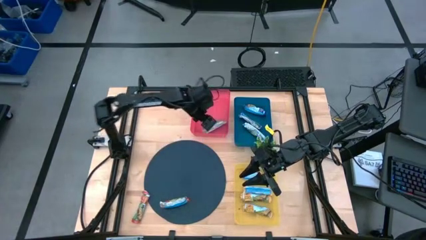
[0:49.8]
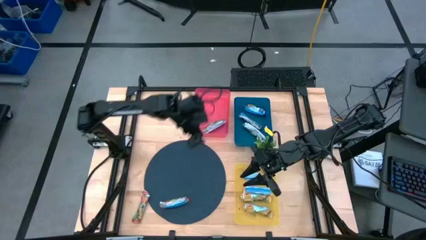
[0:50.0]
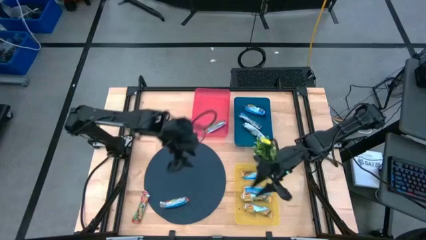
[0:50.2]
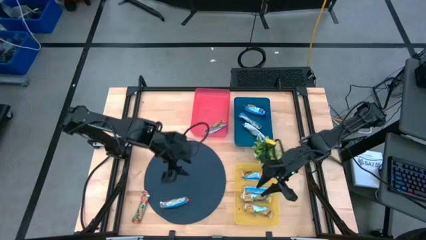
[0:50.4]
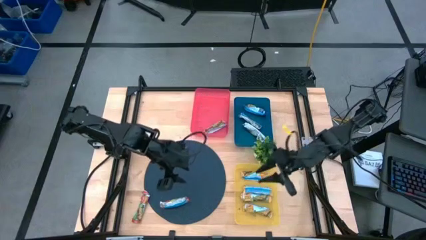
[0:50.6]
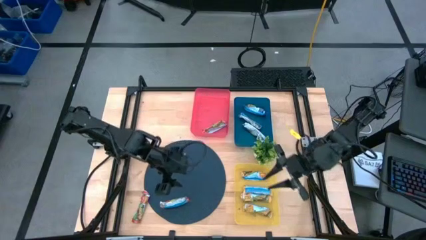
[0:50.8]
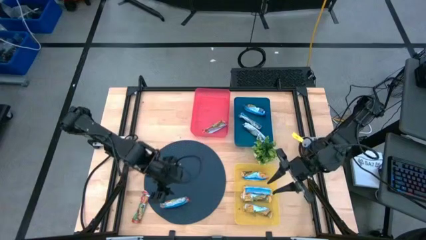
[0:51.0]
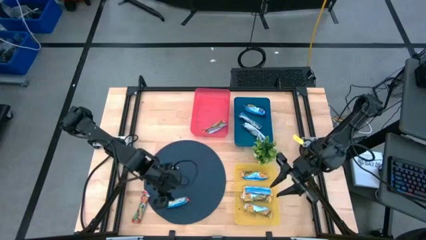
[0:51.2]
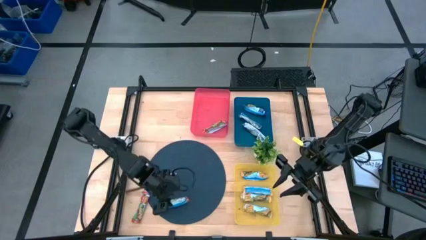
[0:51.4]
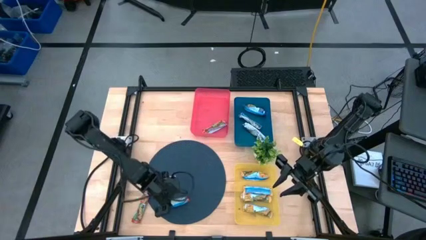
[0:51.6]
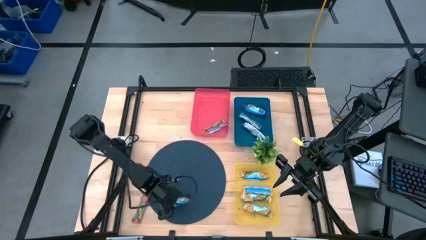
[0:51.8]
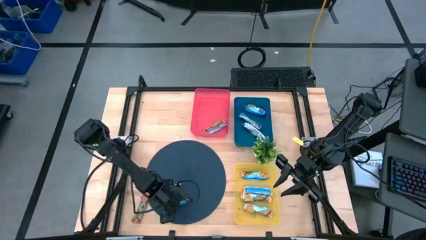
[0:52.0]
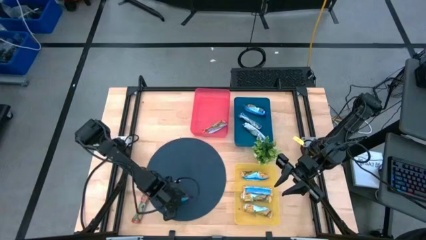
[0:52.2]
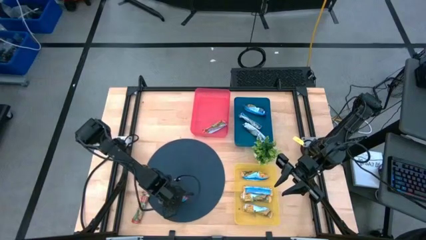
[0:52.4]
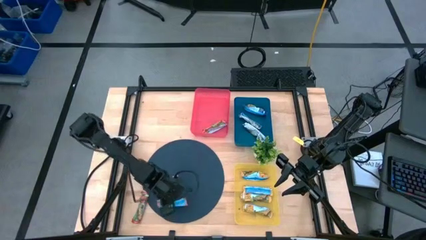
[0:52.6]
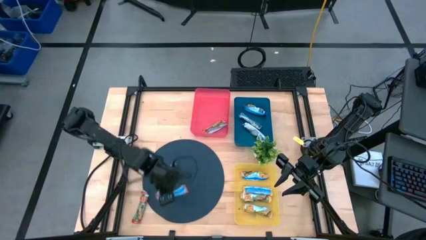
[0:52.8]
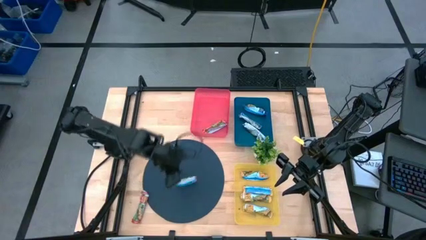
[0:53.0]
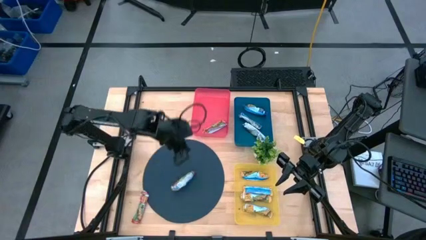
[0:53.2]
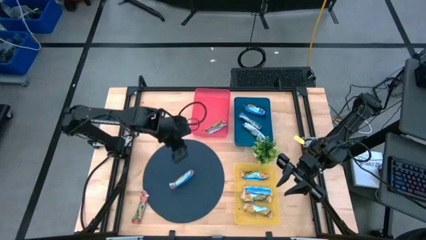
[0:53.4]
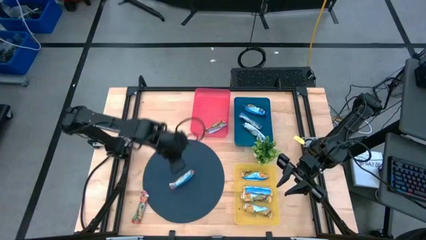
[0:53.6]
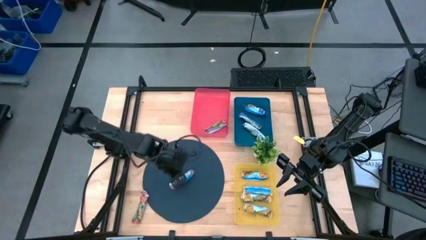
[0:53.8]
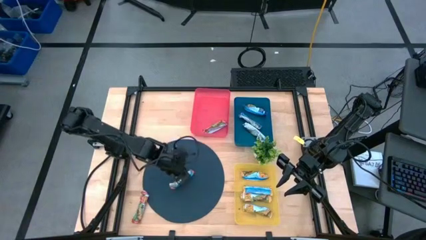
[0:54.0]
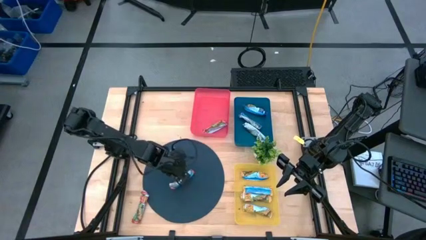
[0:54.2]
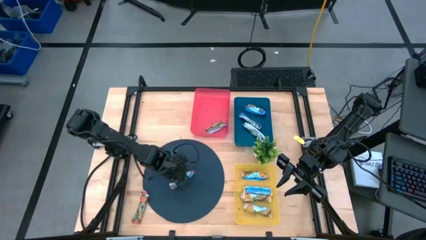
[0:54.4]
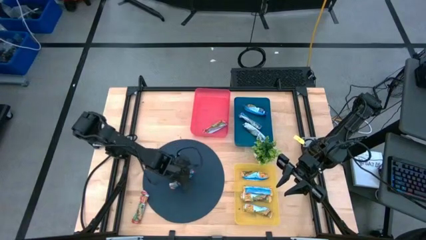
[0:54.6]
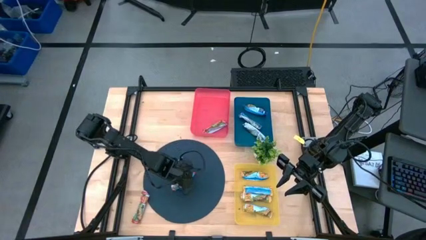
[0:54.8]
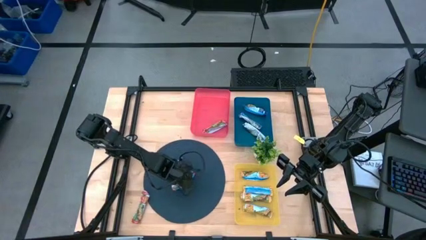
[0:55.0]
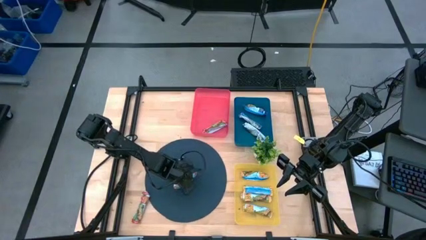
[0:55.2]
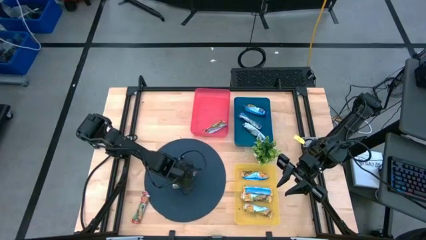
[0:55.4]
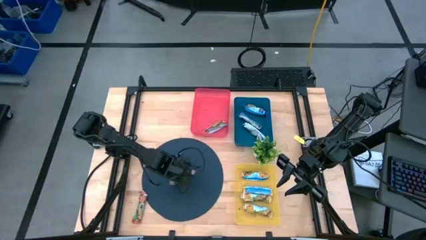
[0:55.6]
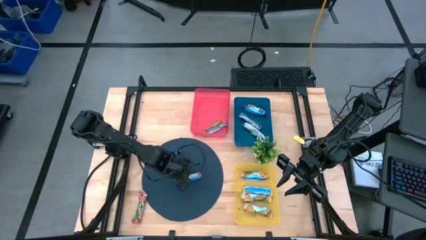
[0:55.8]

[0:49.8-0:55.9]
Task: Pick and place Granola Bars by type
Put the red granola bar into the red bin

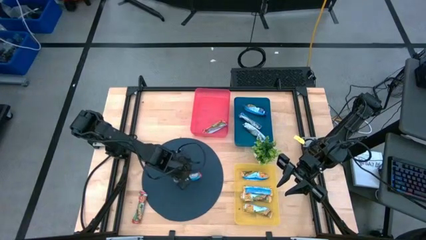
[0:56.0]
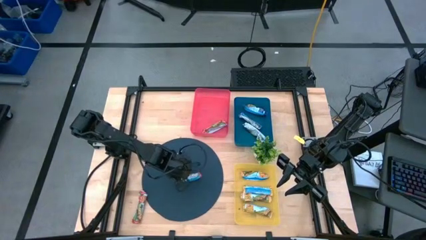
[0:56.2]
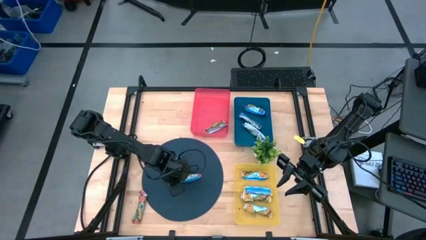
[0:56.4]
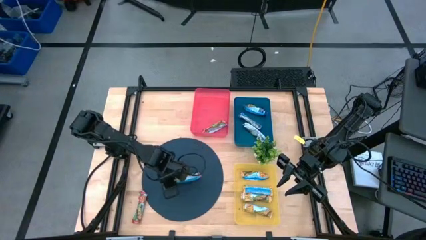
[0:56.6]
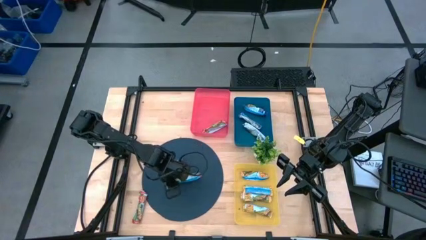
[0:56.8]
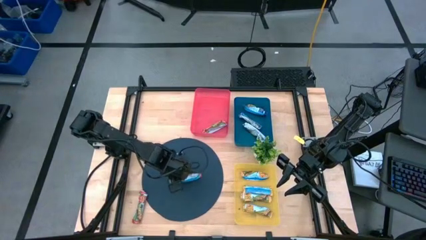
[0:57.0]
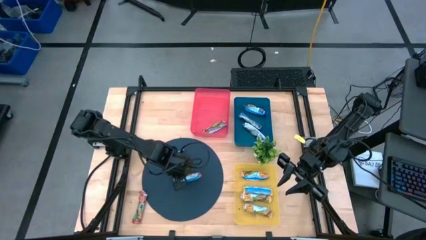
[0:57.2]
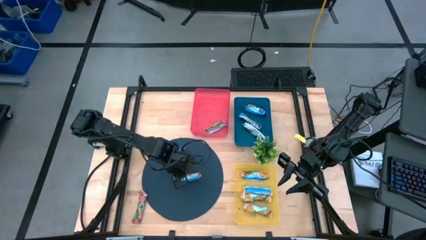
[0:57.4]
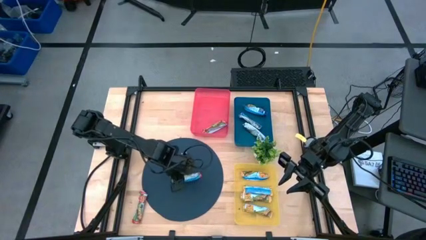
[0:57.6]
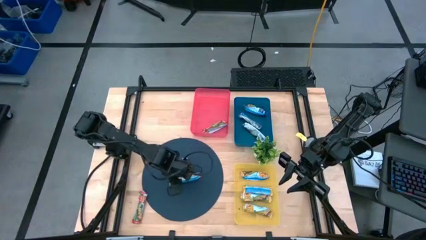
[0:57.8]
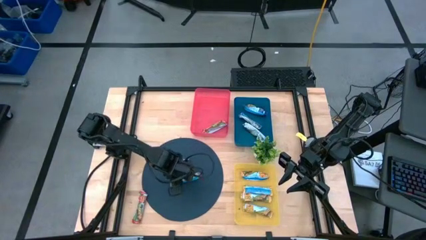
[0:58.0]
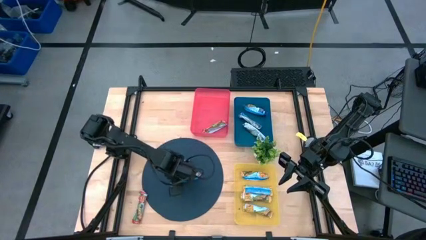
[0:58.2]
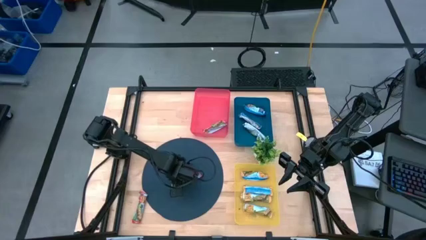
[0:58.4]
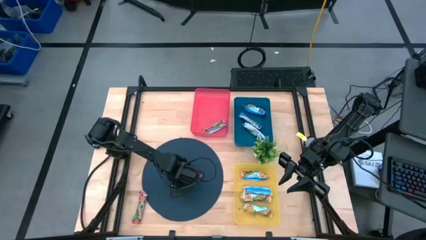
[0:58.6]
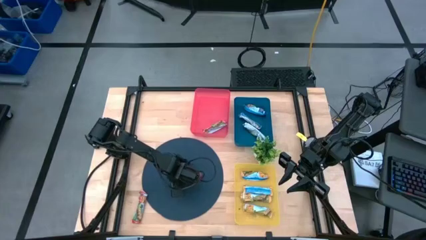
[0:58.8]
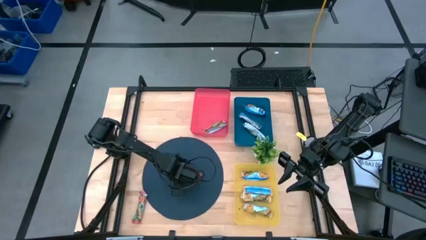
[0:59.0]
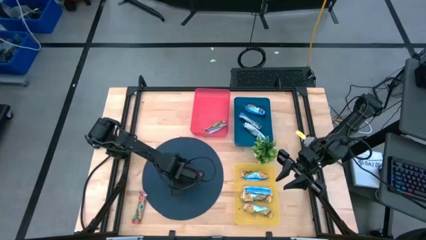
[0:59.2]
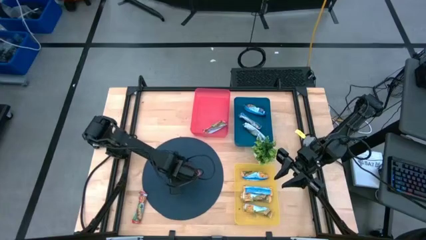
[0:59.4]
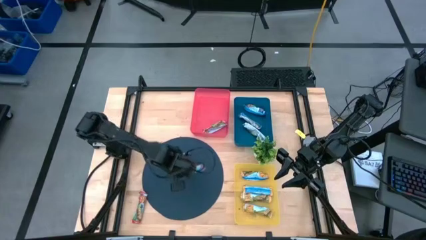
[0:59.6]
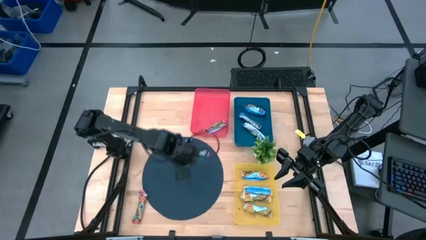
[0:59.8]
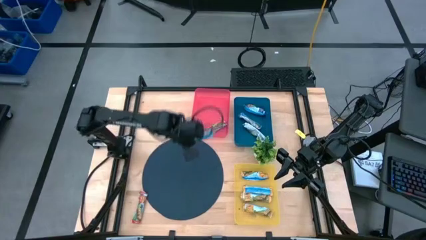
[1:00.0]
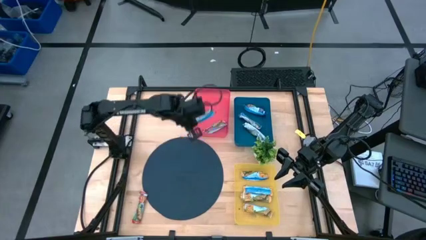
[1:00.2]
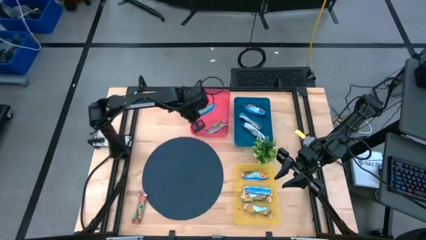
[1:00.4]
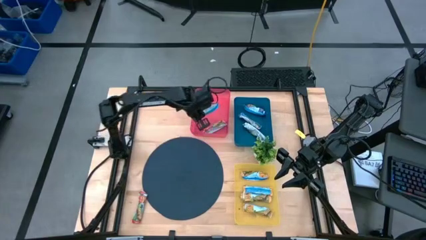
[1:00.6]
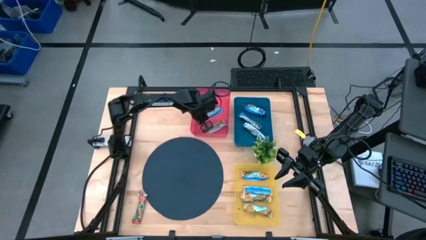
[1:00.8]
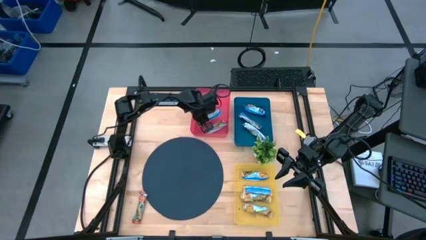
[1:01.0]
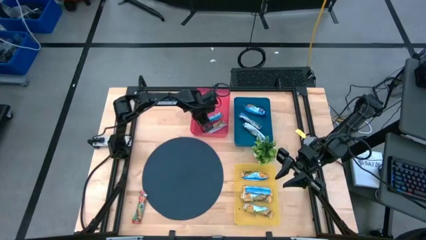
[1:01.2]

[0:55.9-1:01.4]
Put the red granola bar into the red bin

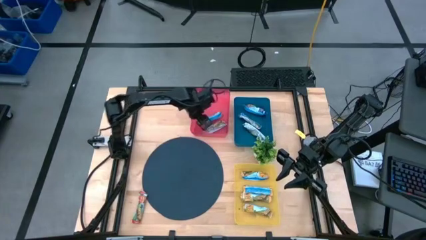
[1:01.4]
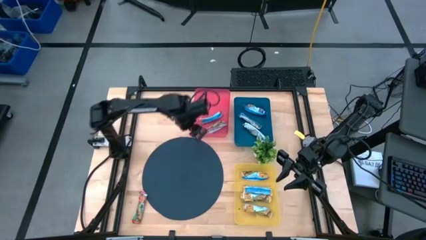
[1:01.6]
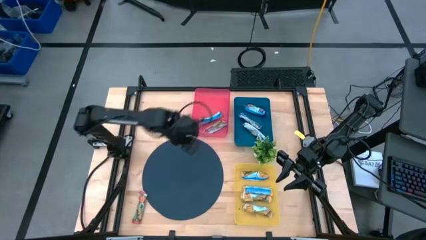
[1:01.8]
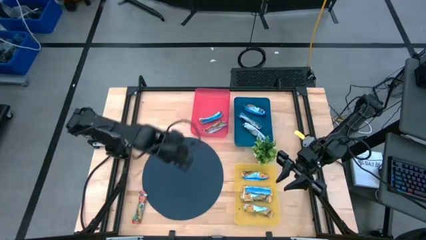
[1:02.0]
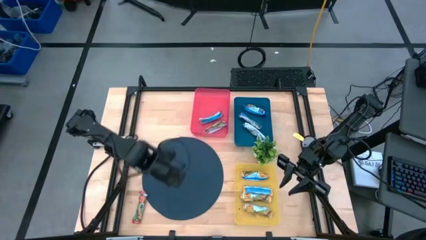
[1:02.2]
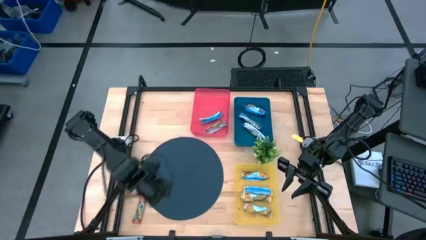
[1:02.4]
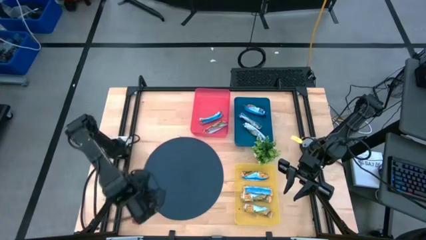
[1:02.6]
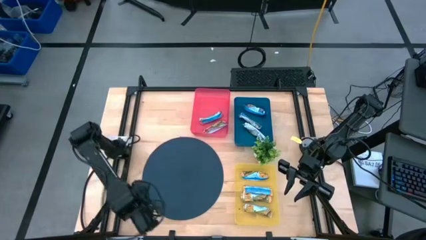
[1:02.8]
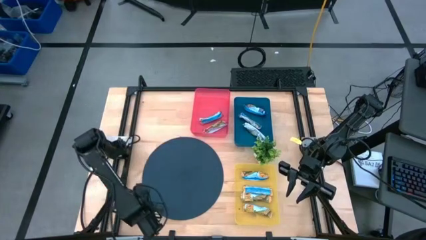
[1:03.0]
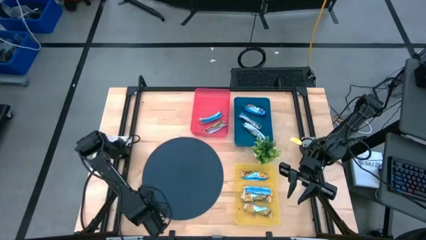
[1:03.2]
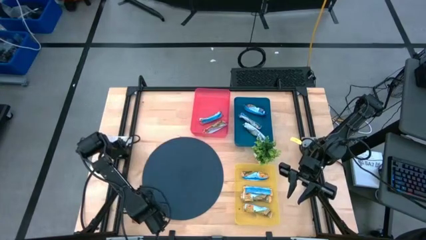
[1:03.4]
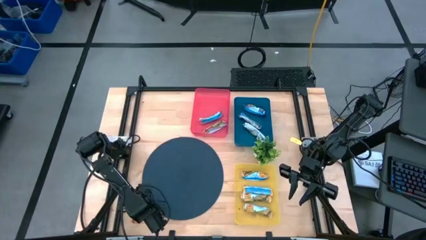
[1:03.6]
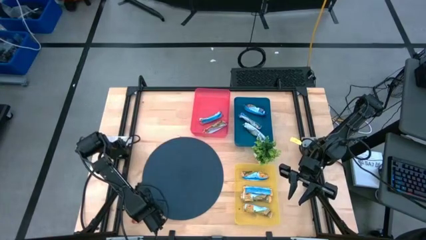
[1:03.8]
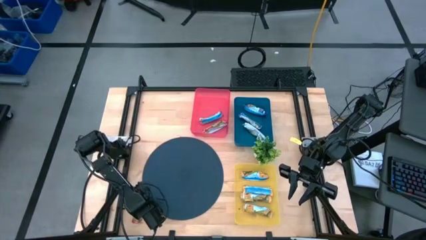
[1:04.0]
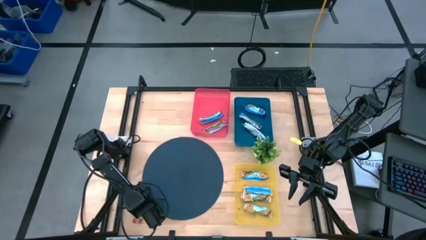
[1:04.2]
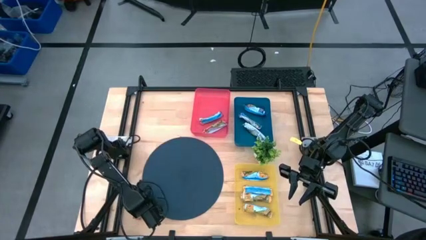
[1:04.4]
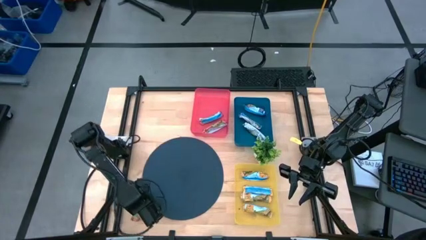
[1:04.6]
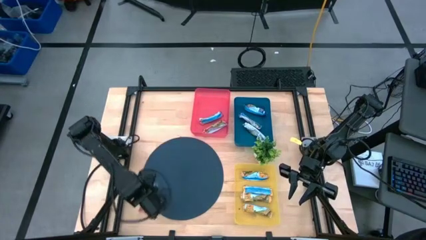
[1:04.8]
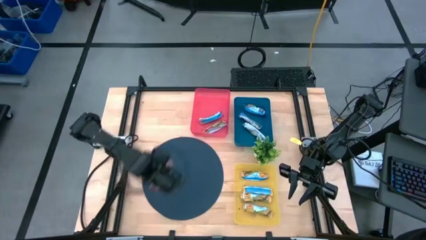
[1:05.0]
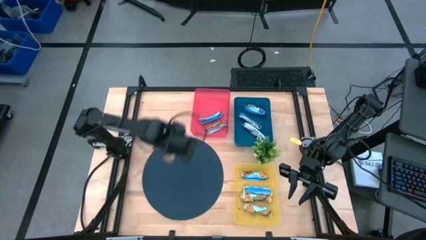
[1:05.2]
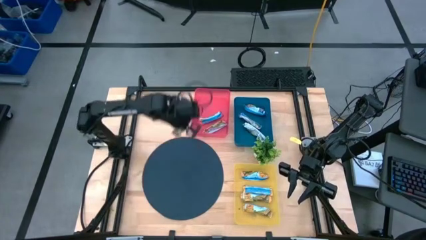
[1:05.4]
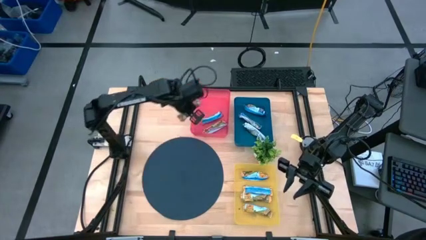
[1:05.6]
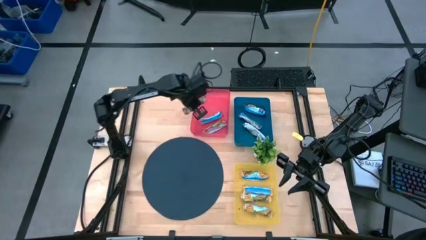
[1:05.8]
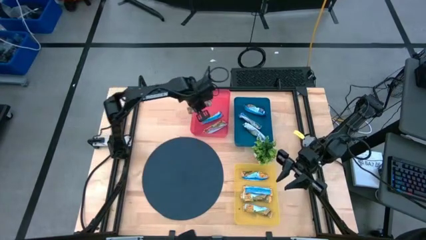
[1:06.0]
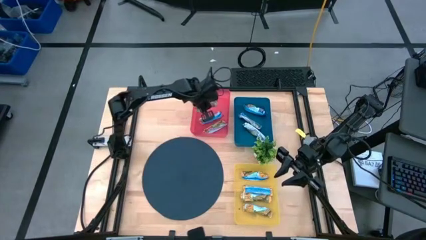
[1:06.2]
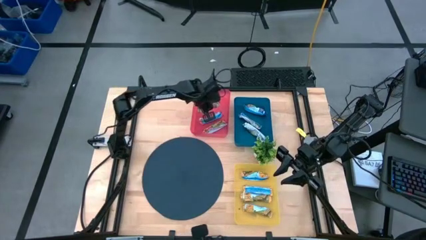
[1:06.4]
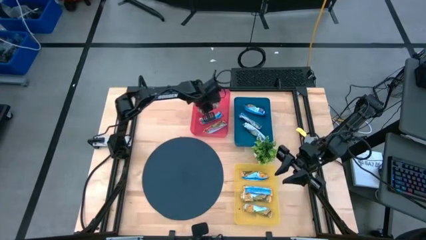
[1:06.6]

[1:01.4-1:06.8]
Put the red granola bar into the red bin

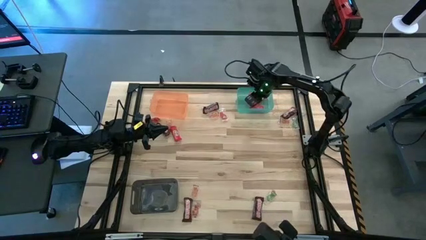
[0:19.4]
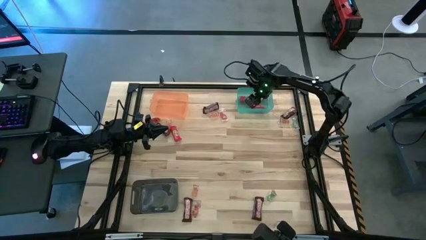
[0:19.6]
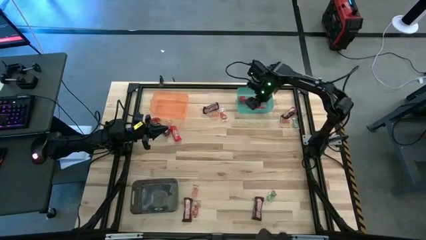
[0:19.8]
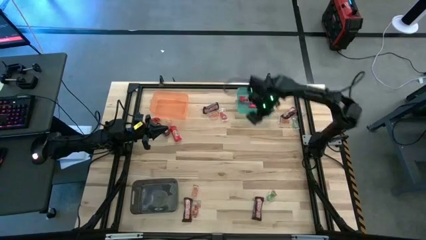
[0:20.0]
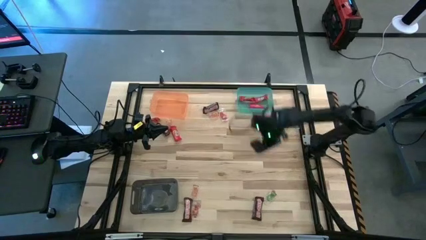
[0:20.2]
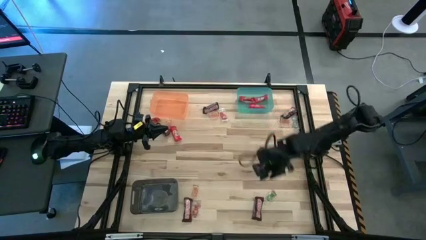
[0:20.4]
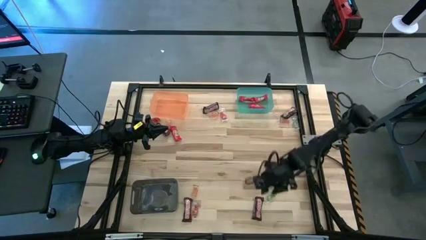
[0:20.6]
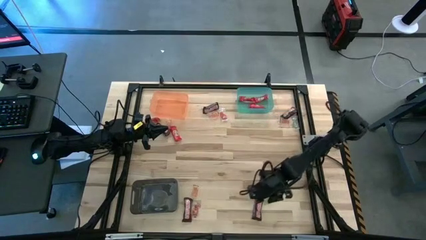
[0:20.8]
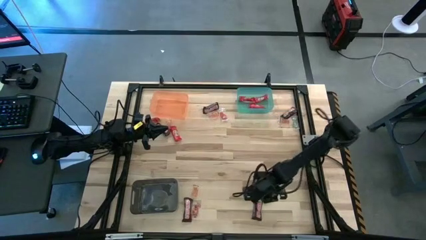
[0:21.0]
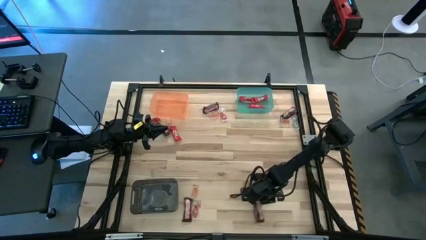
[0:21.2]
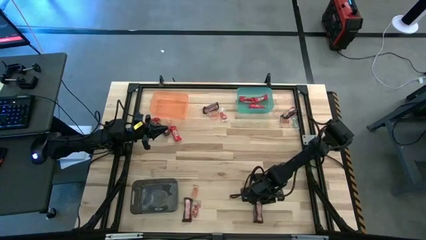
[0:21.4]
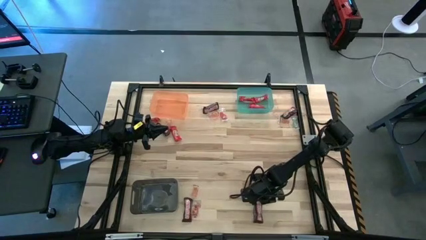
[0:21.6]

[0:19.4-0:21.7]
Task: Sort candy by brand, put in halloween buckets
Put the brown chocolate bar into the black bin
